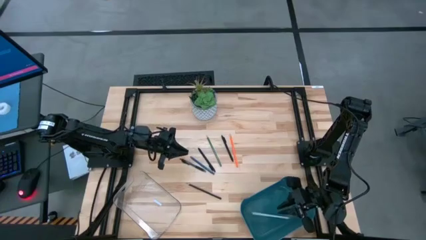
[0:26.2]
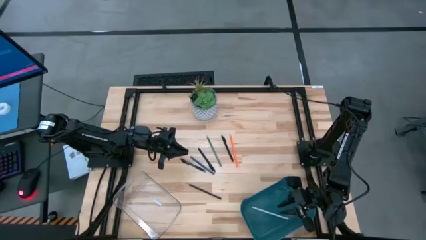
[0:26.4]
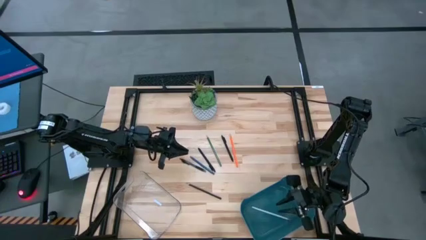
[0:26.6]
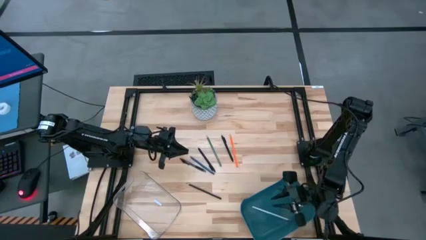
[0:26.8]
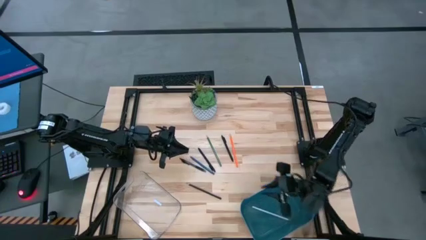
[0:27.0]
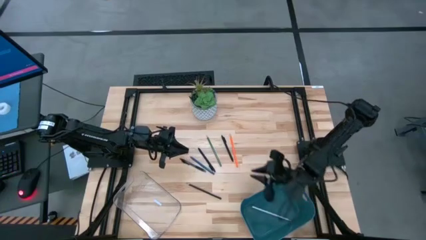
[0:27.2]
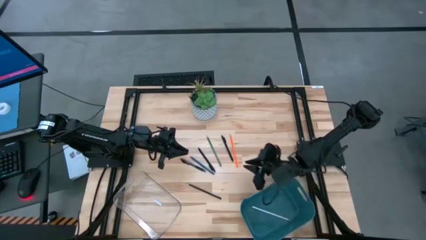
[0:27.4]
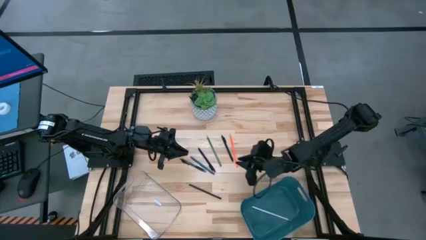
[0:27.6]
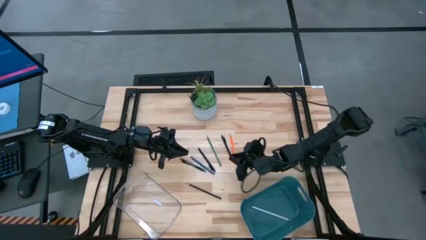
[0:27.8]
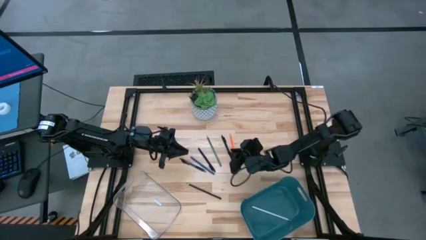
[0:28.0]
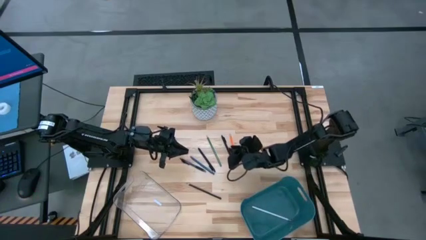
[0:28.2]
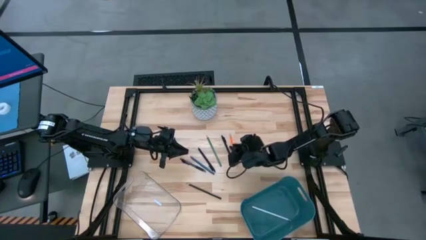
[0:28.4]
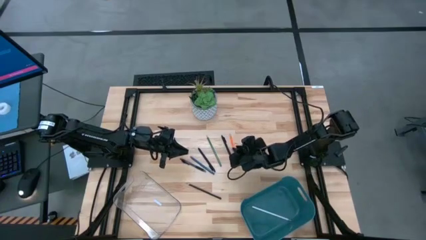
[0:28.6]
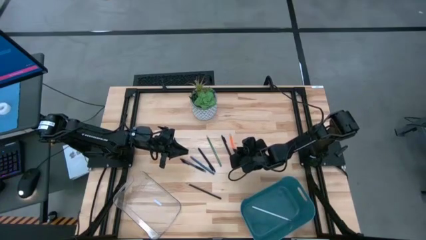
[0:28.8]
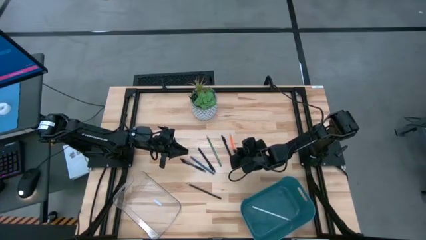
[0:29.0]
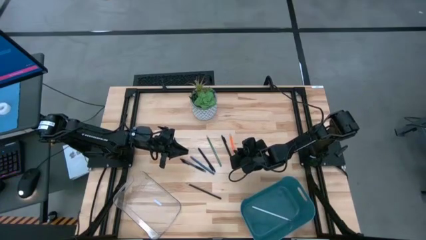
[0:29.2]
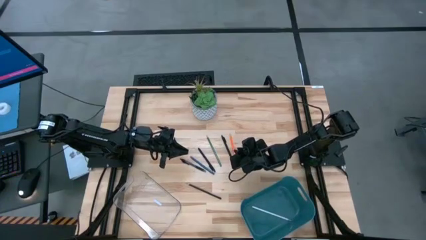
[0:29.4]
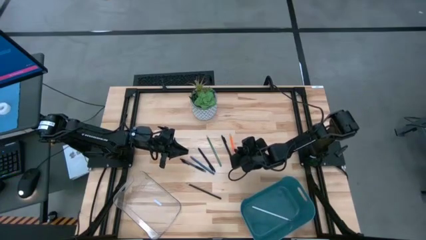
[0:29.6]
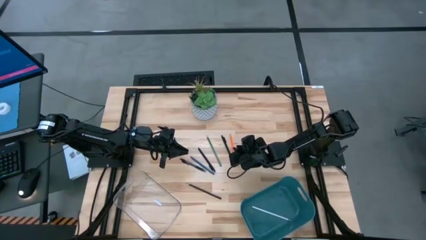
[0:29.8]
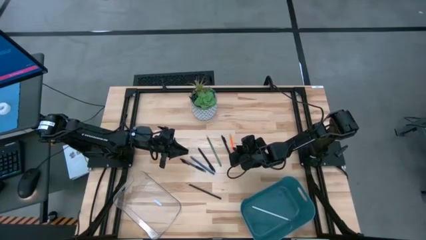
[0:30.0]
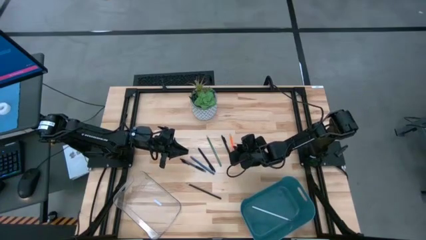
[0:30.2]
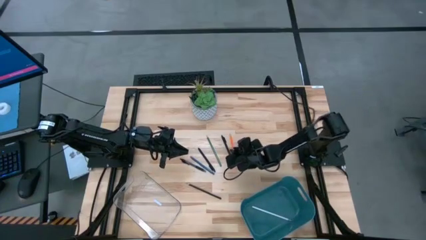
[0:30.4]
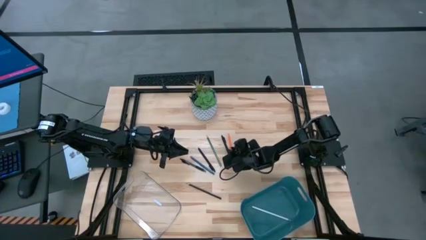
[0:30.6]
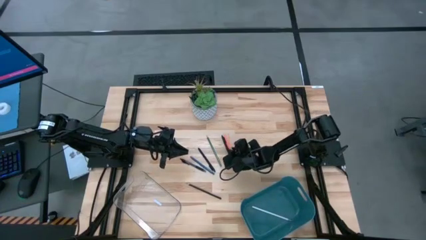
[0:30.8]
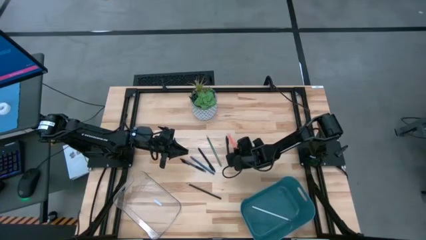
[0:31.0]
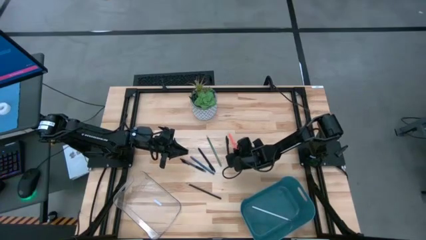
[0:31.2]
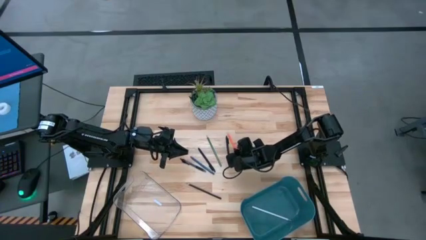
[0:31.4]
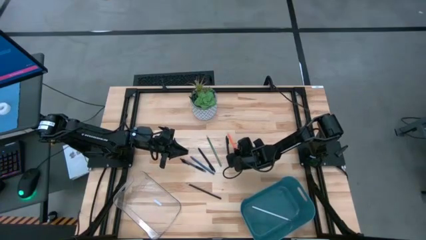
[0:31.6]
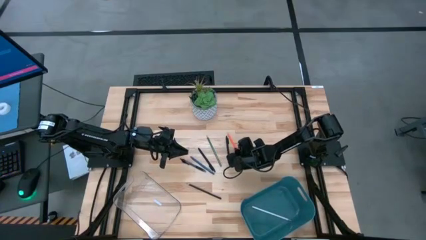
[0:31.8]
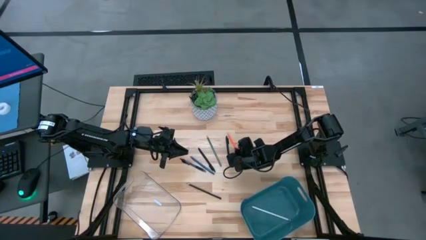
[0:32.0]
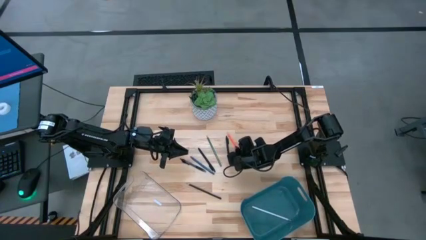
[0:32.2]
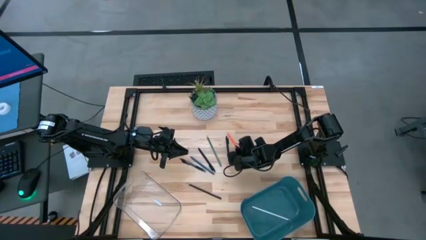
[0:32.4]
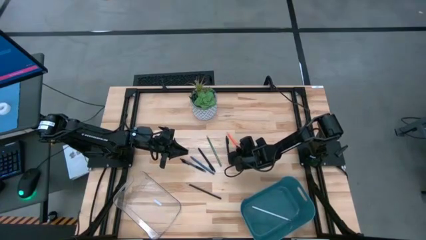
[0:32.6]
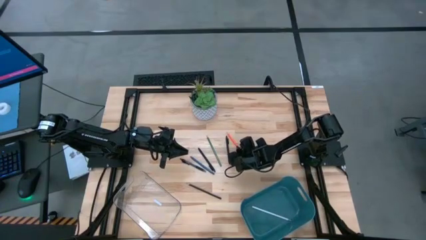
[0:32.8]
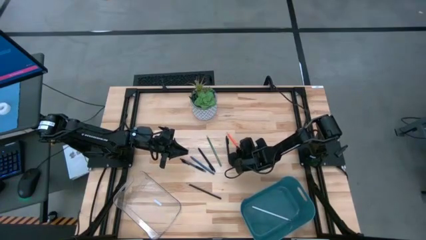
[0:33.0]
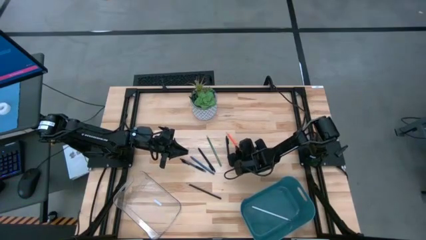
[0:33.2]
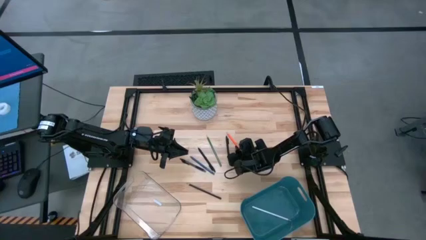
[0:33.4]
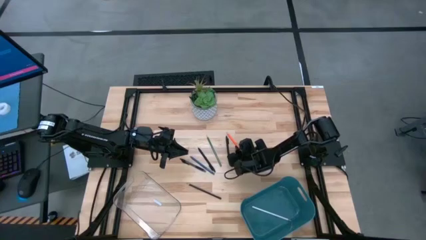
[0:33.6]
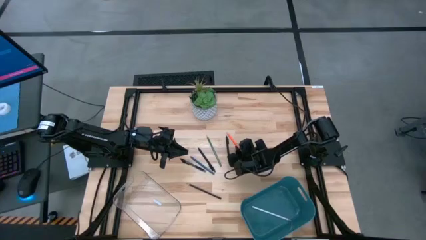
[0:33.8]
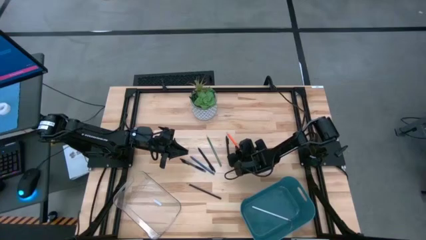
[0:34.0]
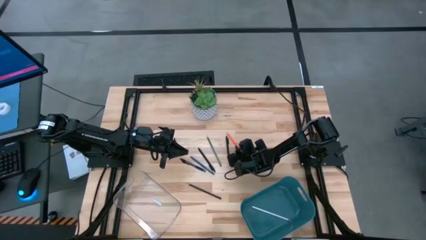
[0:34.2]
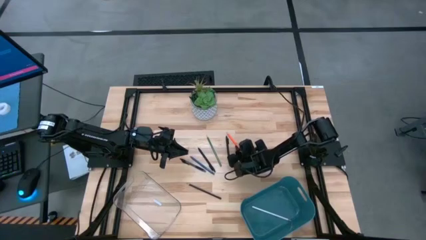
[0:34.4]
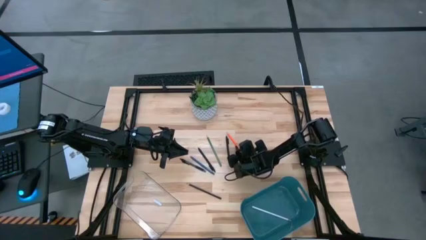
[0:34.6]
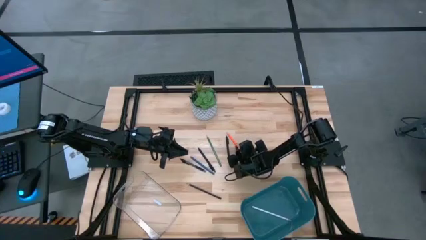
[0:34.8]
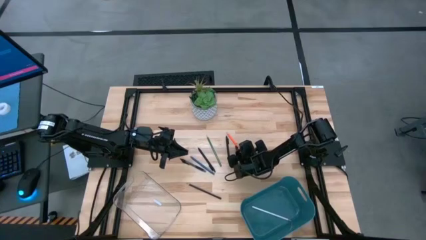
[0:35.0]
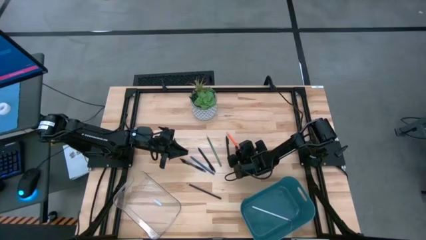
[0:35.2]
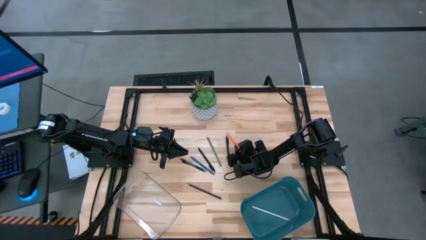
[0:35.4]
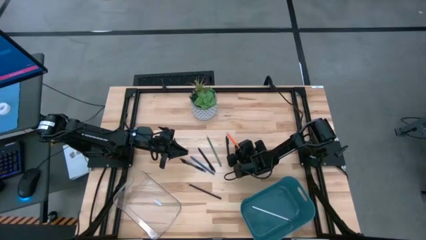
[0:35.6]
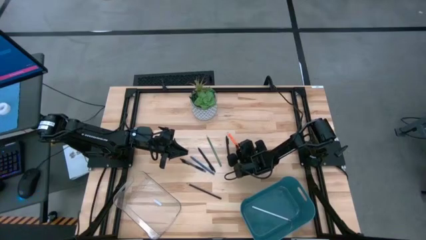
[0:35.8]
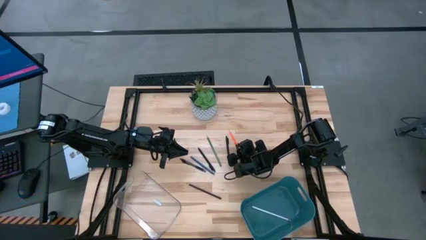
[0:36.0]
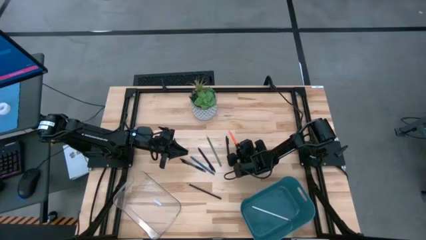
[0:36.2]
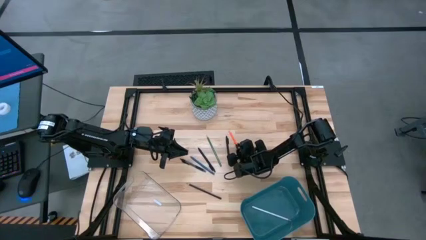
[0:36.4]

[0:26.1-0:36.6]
Task: Sort pens & pencils
Put the orange pencil into the blue bin
